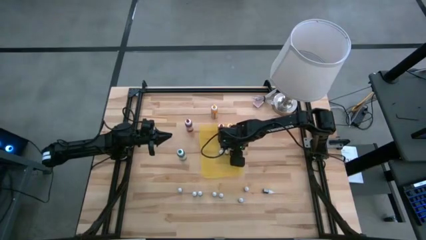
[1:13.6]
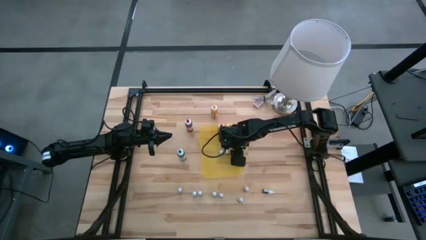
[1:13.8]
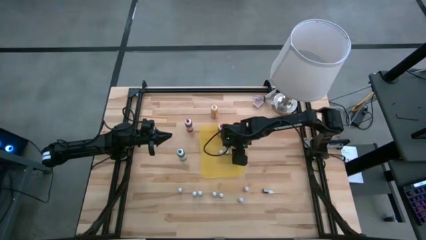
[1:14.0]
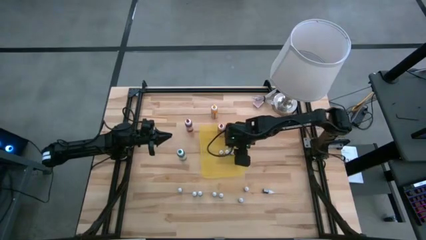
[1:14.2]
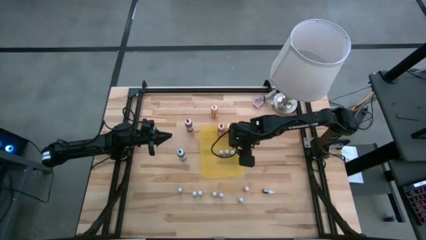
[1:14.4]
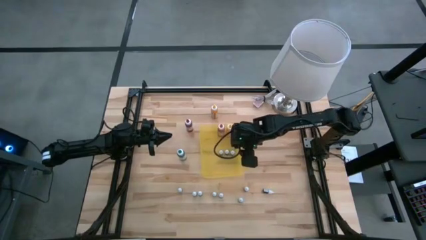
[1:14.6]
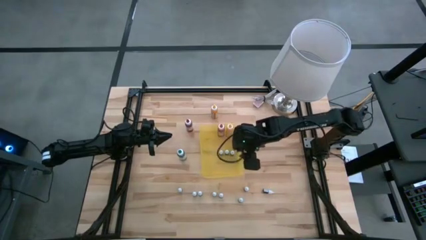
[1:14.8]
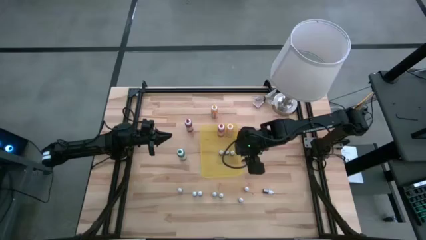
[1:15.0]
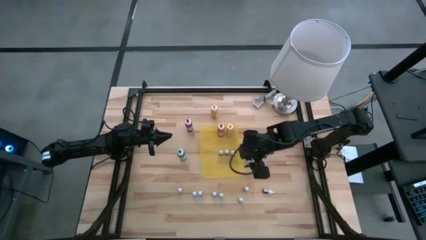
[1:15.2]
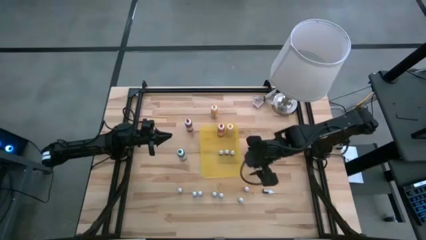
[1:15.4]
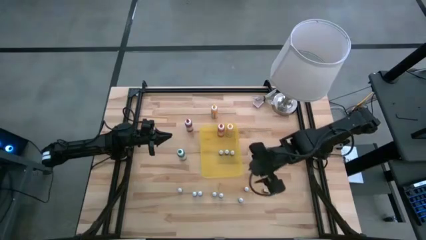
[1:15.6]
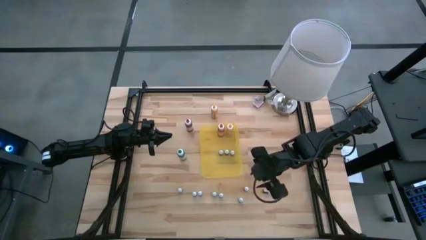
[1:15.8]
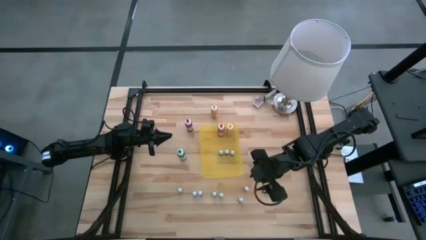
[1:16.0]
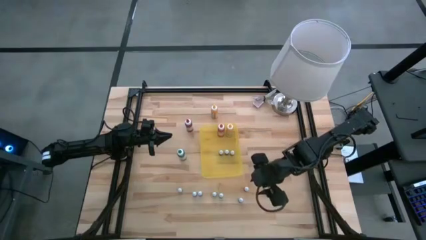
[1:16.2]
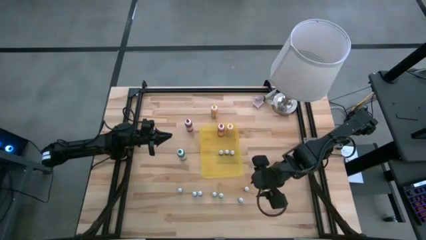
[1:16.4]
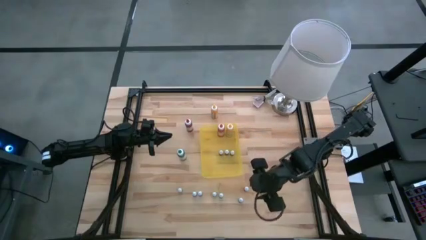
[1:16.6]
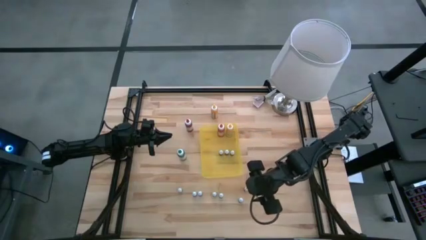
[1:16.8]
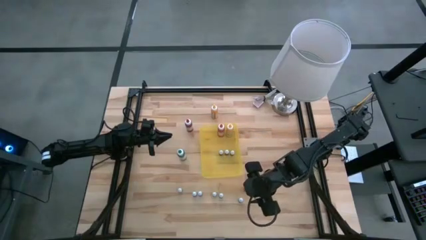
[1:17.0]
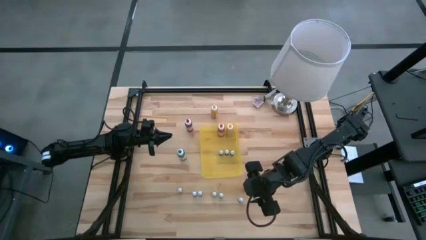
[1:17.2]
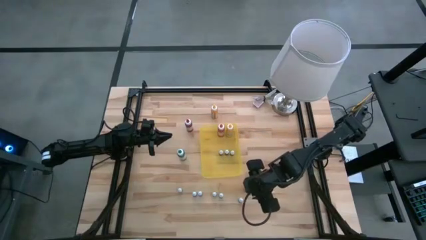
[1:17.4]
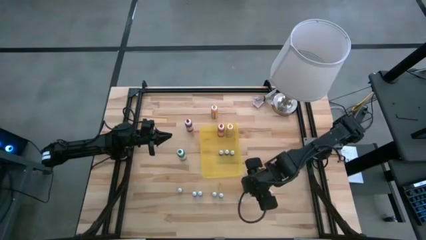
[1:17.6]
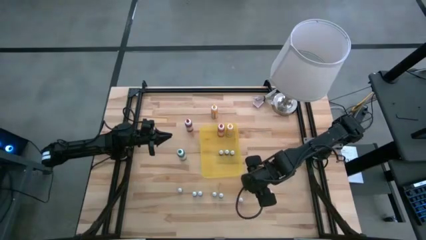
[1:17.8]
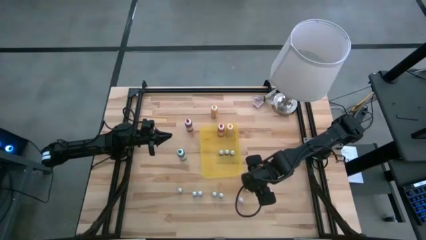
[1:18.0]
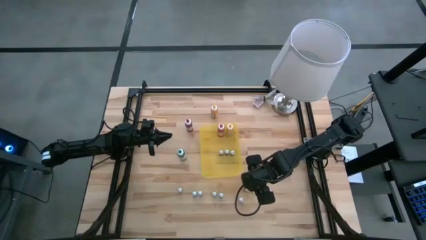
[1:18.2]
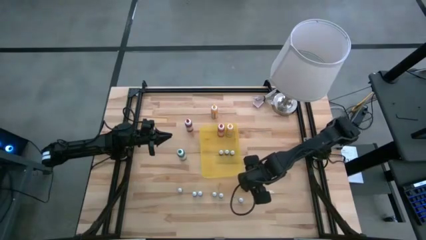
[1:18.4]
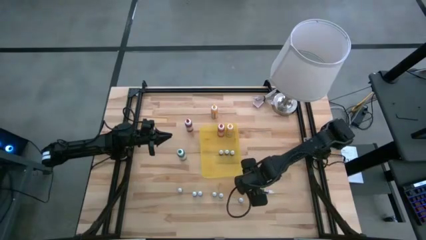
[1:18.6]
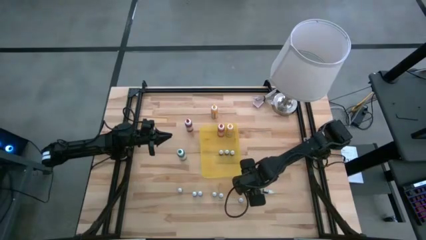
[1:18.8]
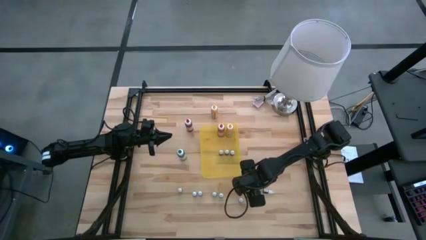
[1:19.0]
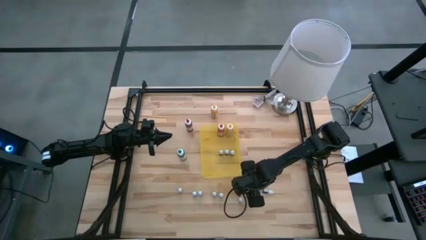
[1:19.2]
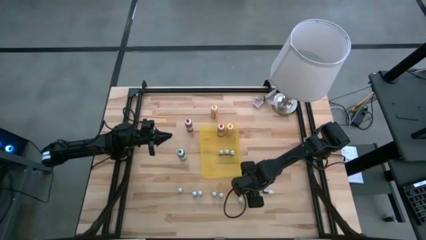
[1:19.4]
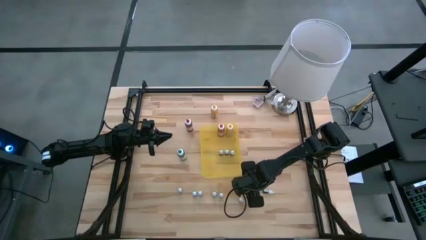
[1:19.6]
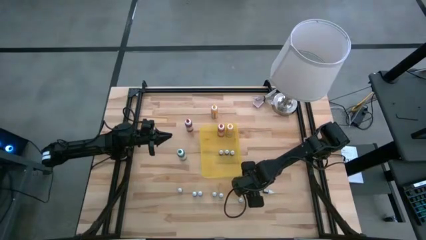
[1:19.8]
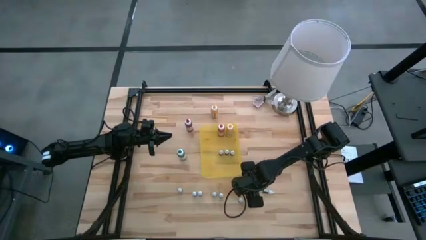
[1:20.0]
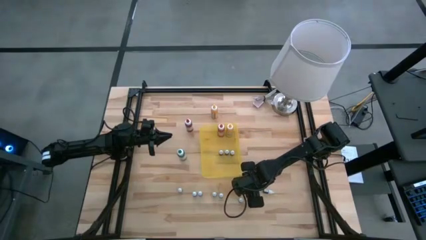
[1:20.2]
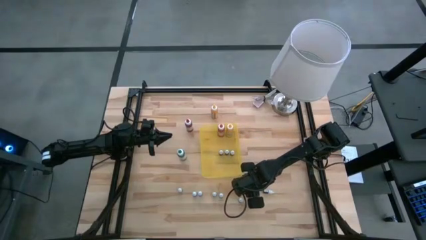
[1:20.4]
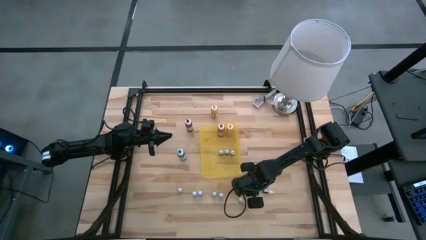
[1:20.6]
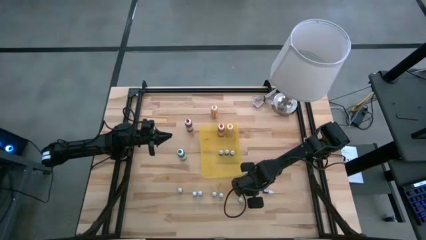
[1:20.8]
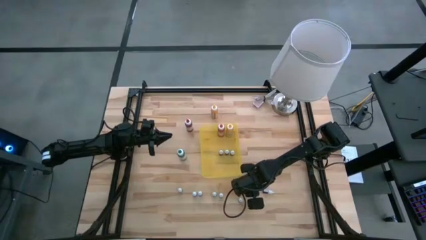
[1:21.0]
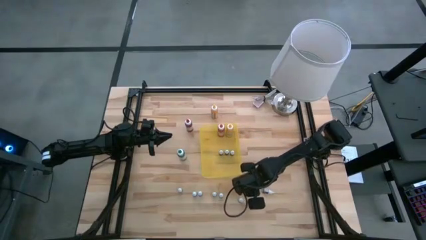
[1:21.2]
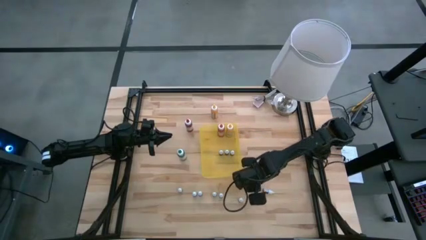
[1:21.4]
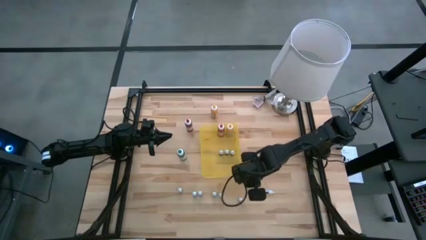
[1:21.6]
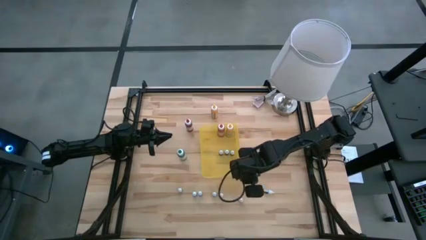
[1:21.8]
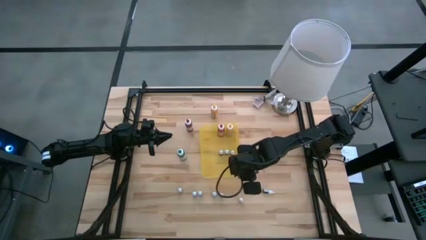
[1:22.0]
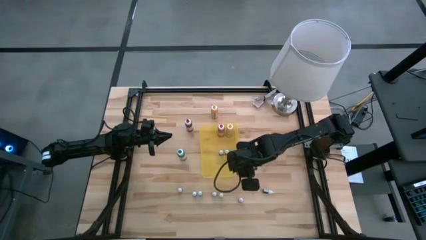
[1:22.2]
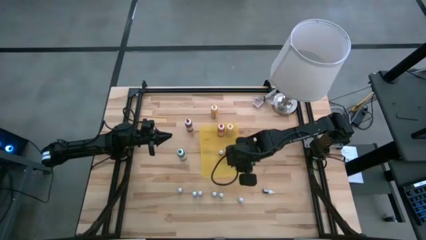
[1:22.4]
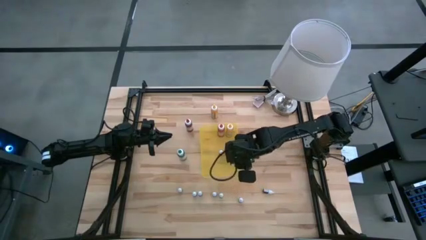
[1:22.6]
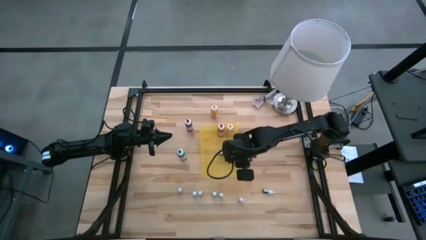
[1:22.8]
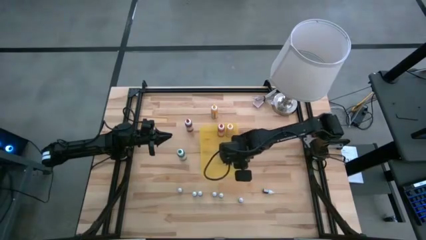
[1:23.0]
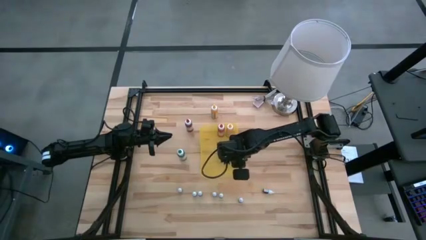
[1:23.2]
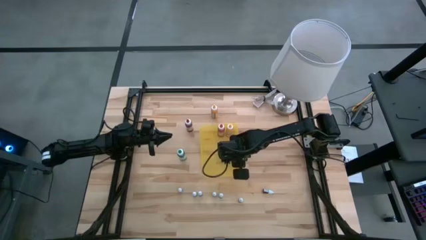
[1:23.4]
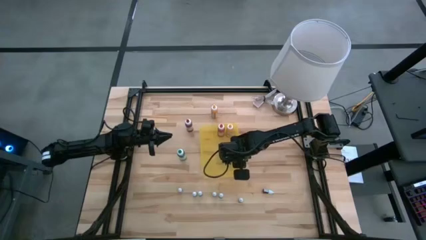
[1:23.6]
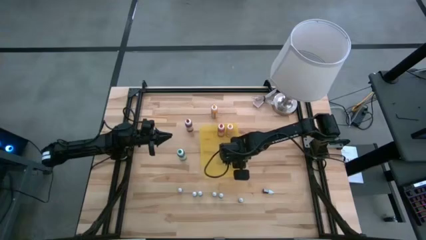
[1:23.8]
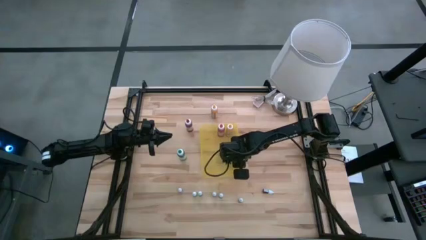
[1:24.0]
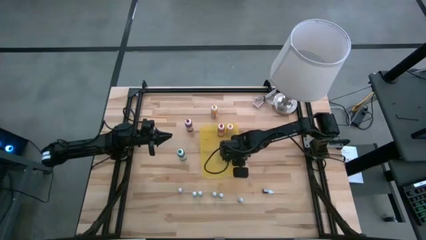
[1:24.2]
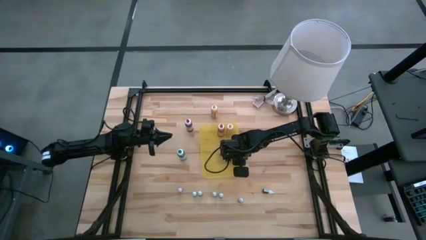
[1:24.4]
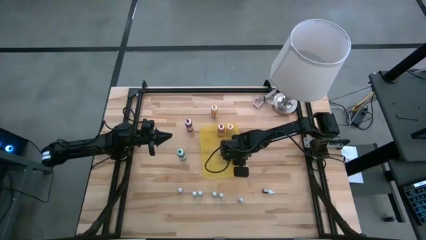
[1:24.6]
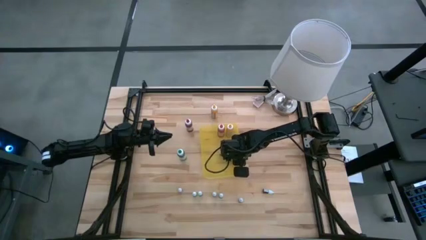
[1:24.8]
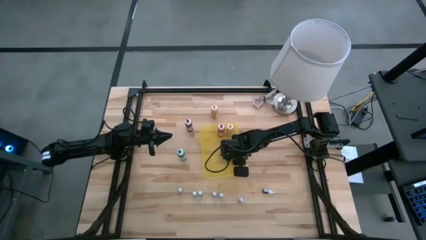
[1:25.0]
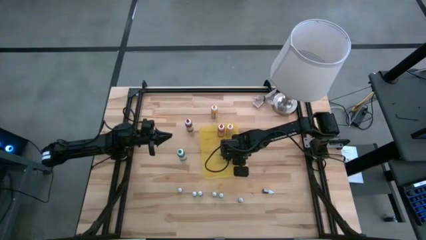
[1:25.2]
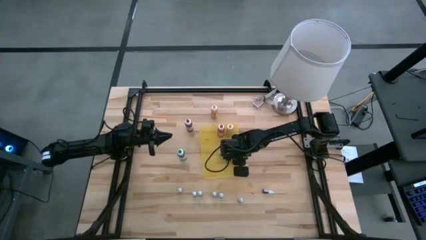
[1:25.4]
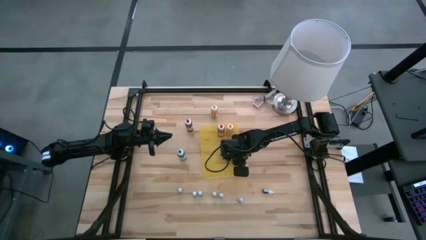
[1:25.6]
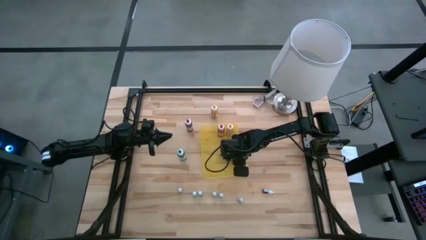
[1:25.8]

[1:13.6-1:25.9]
Task: Pick & Place food coloring
Put the small red food coloring bottle into the bin

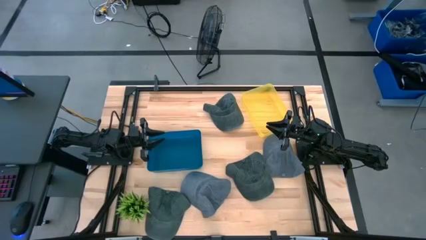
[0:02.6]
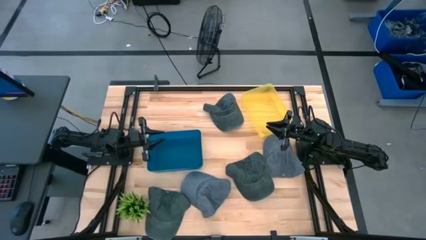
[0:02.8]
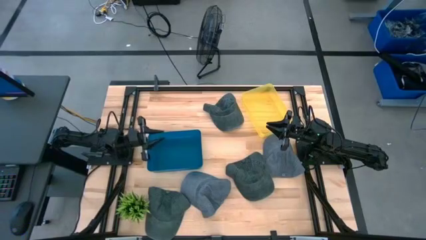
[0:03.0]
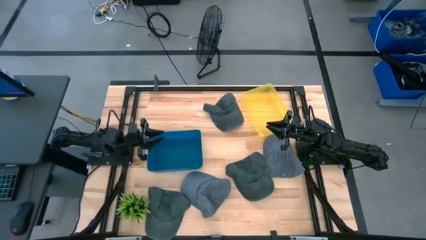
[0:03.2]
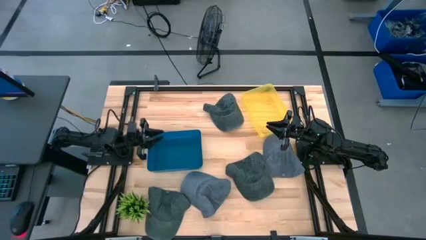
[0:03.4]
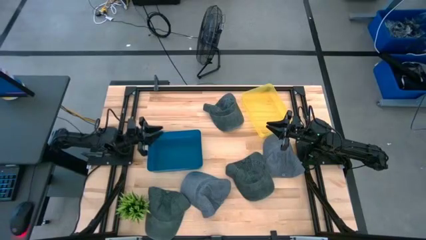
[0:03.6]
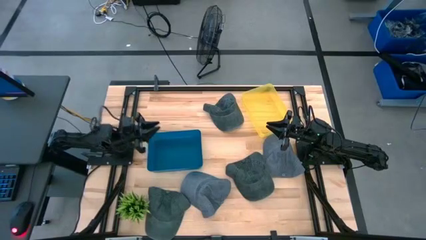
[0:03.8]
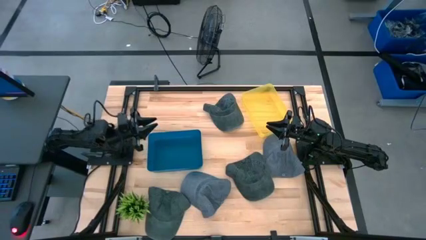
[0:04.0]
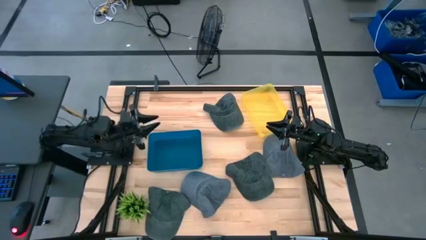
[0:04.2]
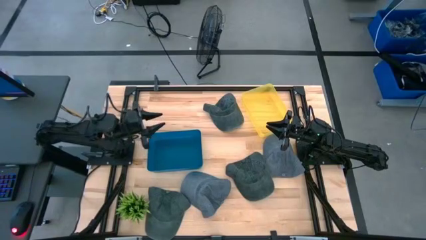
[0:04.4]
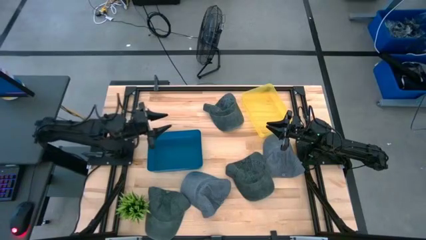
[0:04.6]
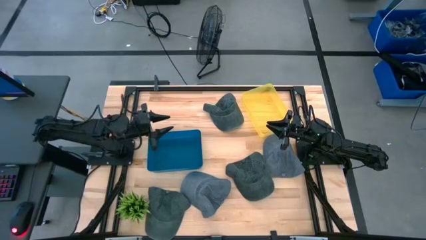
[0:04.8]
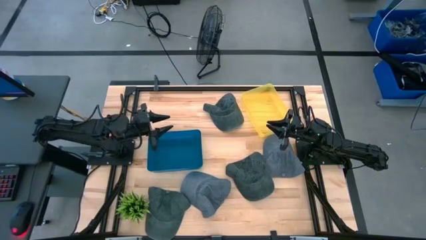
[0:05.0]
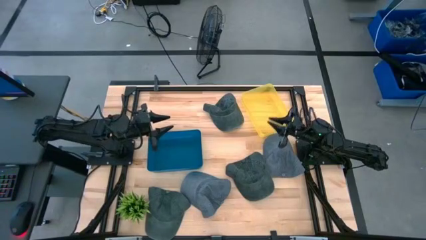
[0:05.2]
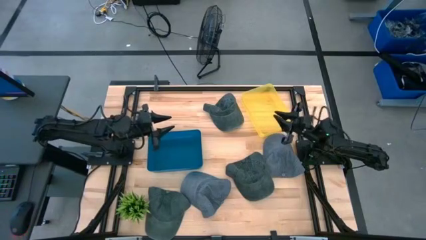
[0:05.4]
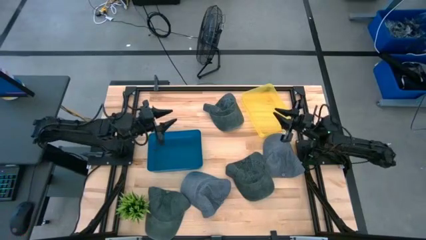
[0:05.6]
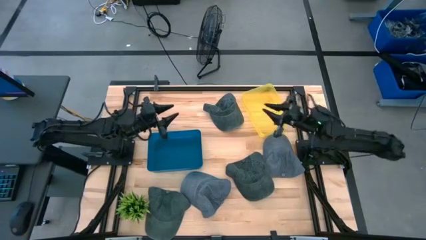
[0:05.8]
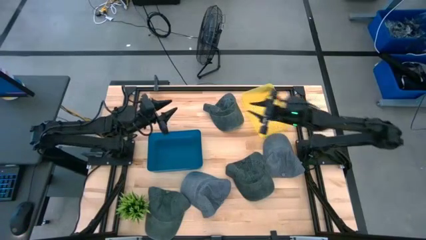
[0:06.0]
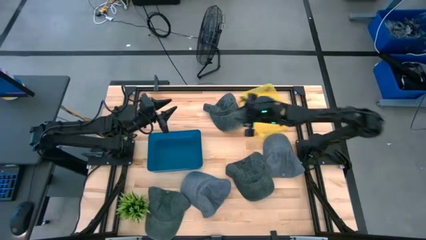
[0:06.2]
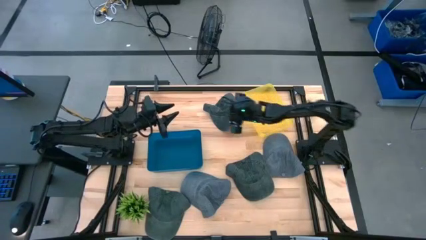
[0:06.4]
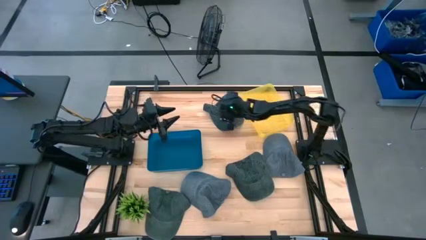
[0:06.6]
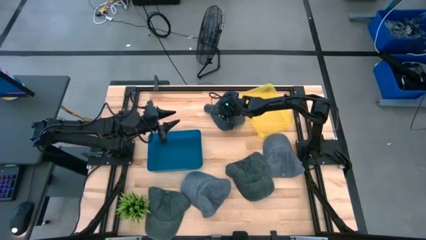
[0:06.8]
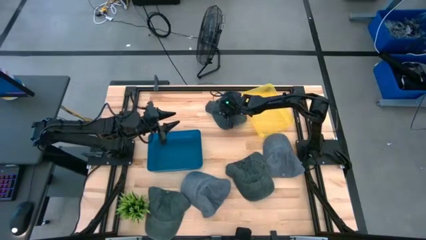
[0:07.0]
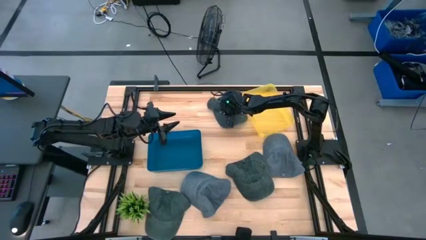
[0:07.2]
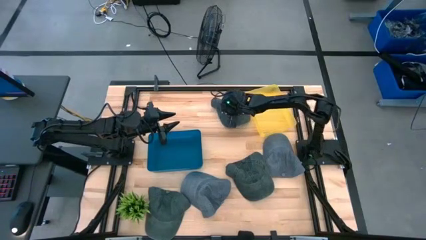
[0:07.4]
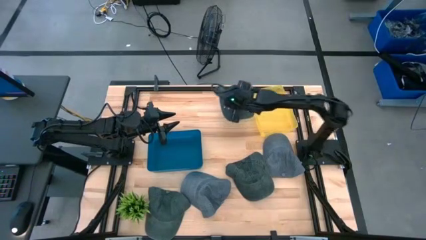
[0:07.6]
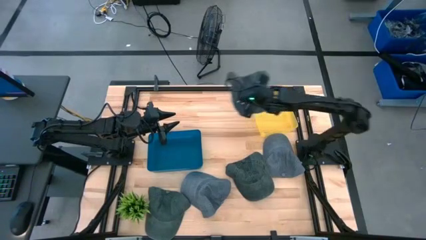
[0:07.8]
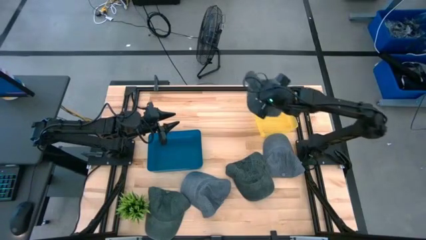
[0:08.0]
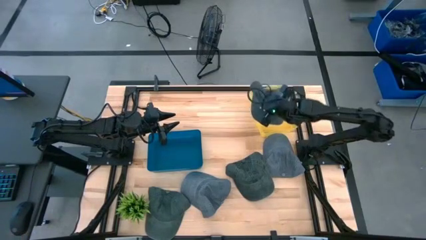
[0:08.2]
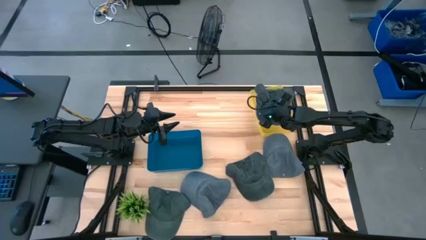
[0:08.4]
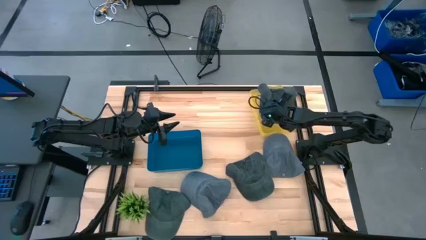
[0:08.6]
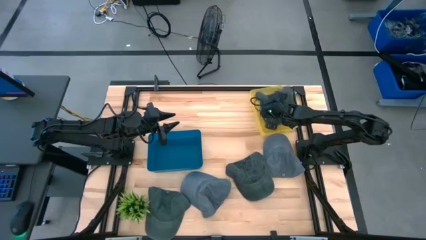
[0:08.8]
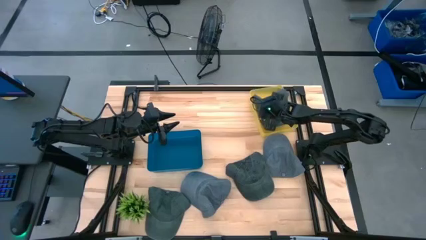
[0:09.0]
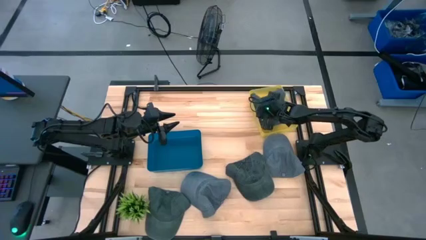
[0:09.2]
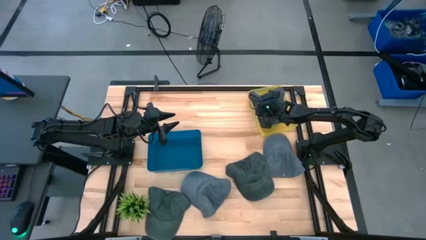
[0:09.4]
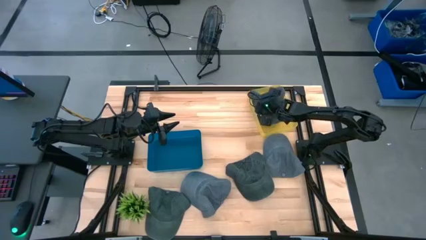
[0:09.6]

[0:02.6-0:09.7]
Task: Pick & Place hat
Put the top green cap into the yellow bin
